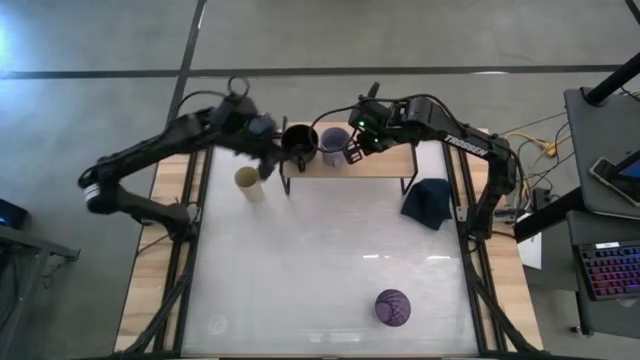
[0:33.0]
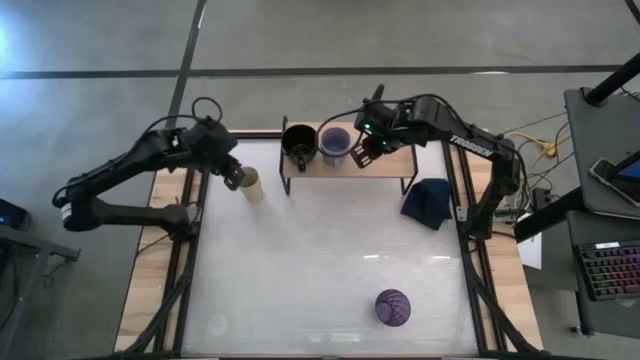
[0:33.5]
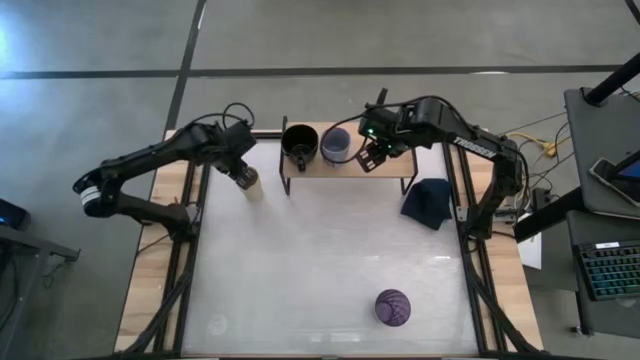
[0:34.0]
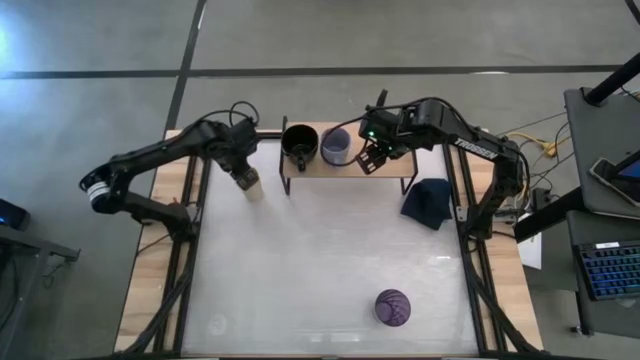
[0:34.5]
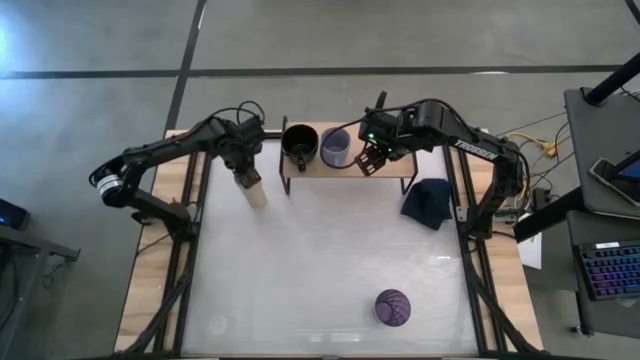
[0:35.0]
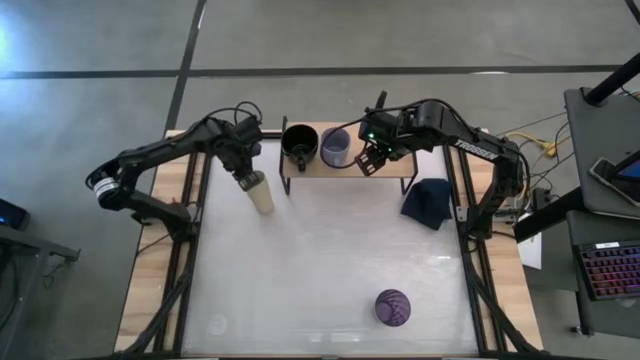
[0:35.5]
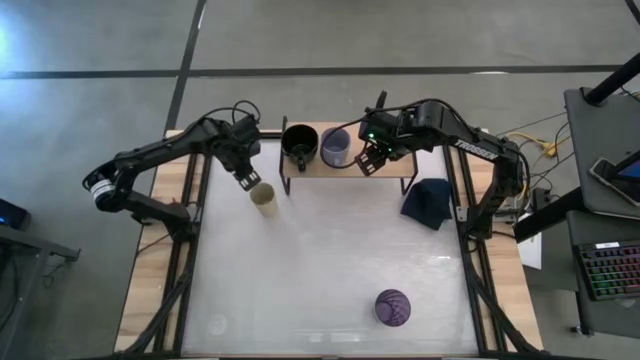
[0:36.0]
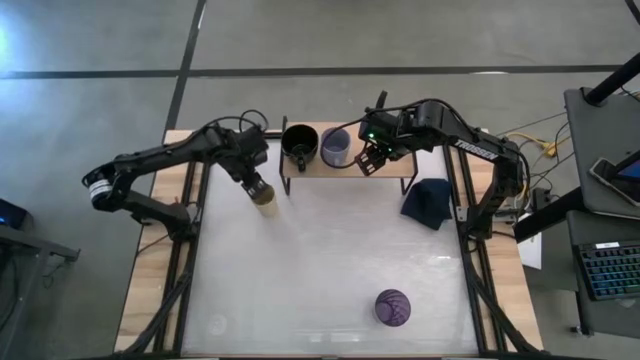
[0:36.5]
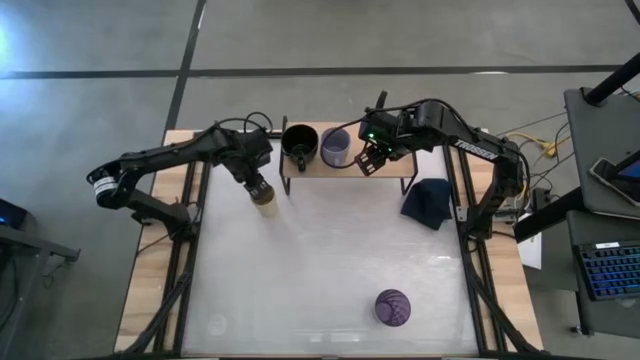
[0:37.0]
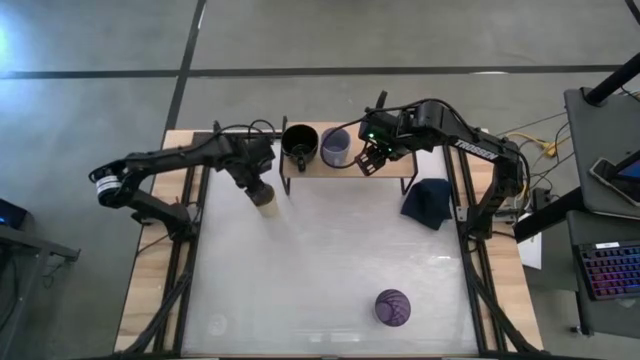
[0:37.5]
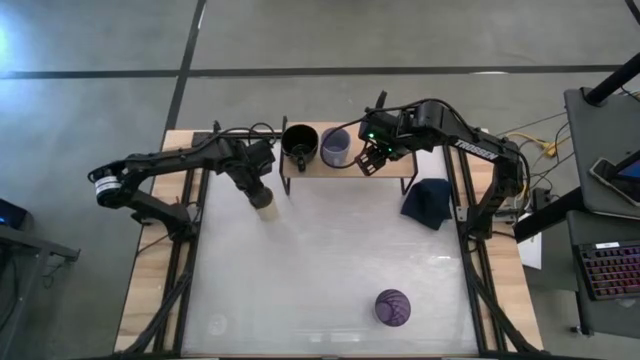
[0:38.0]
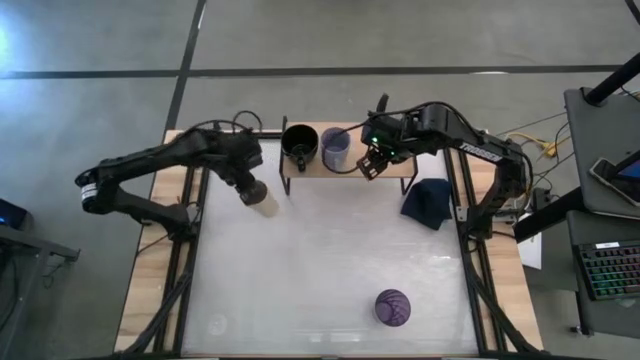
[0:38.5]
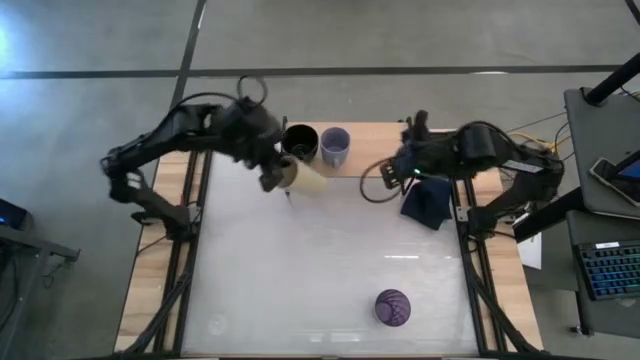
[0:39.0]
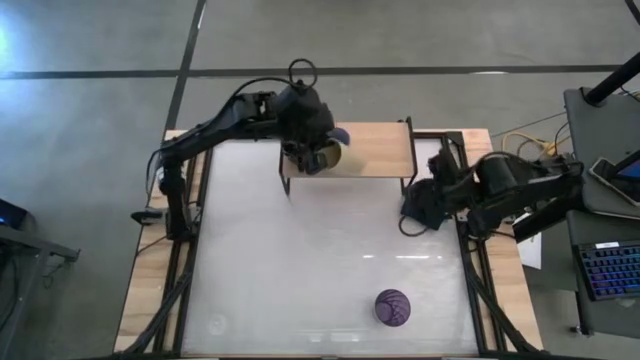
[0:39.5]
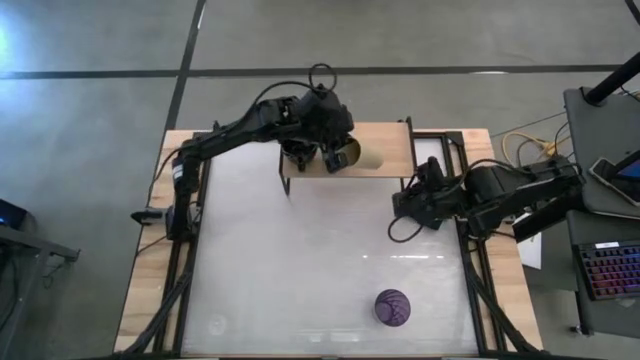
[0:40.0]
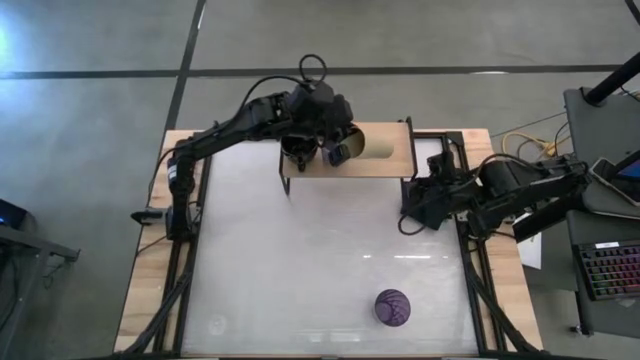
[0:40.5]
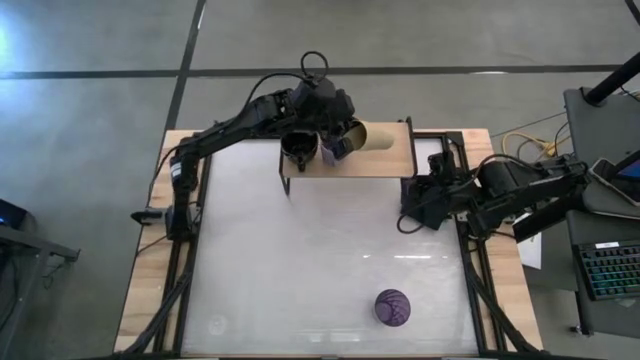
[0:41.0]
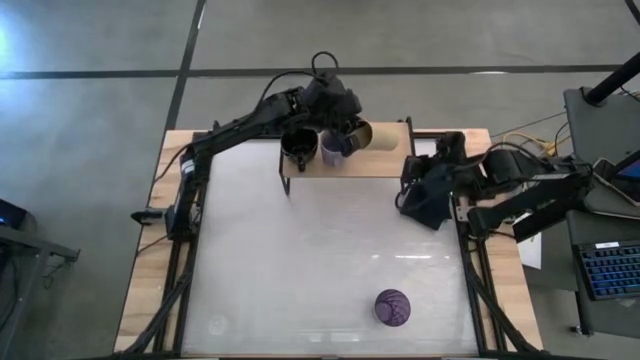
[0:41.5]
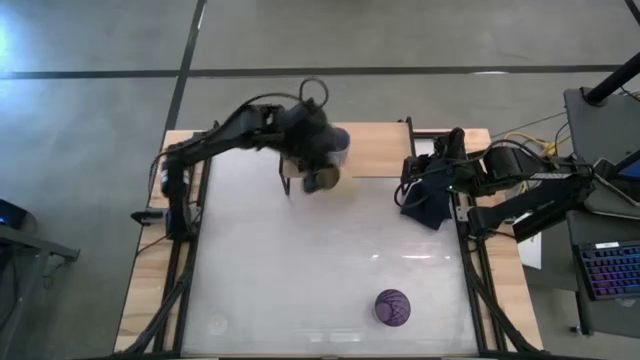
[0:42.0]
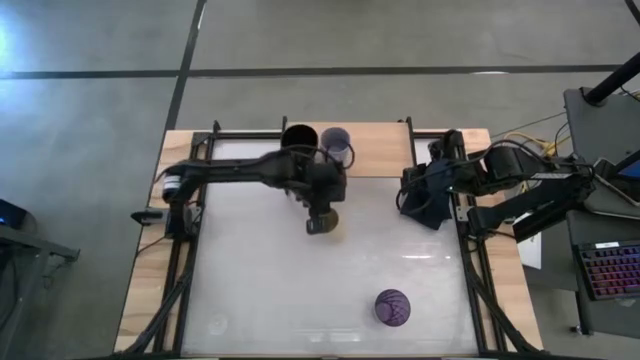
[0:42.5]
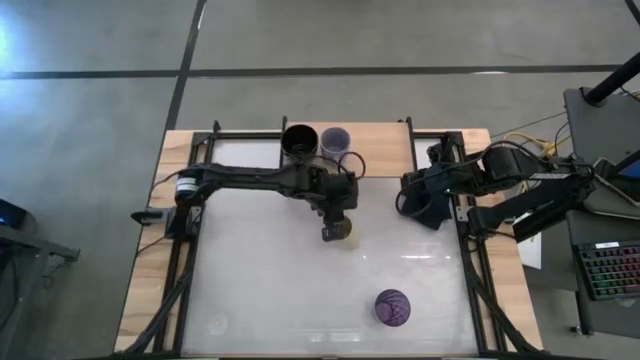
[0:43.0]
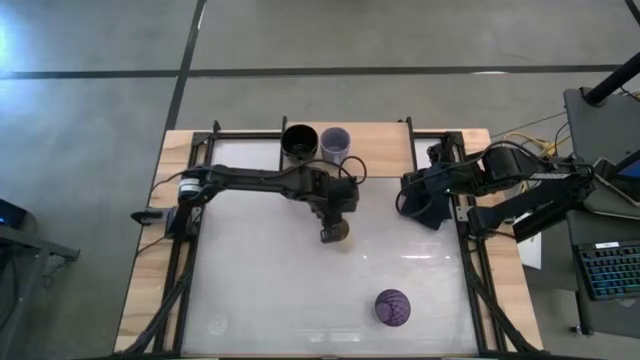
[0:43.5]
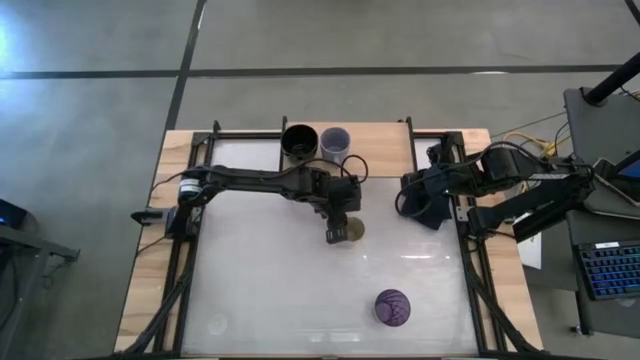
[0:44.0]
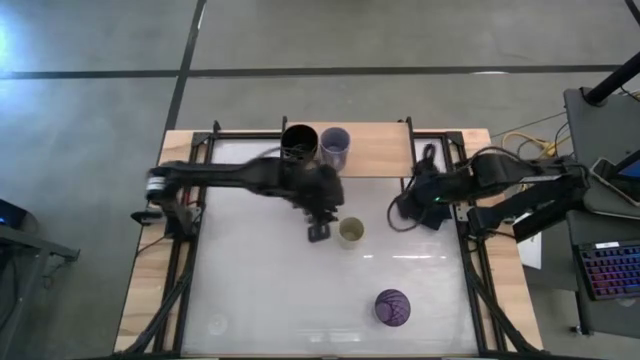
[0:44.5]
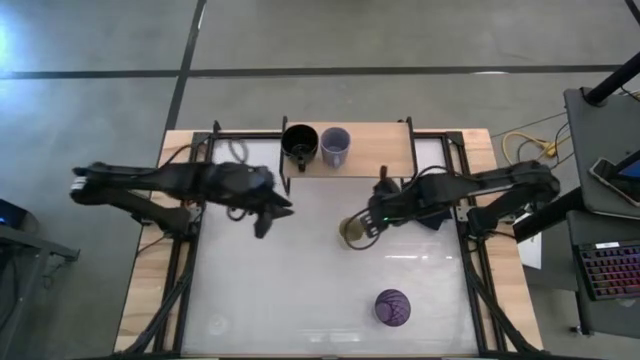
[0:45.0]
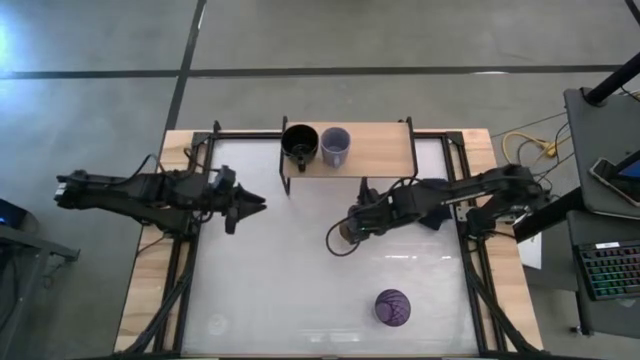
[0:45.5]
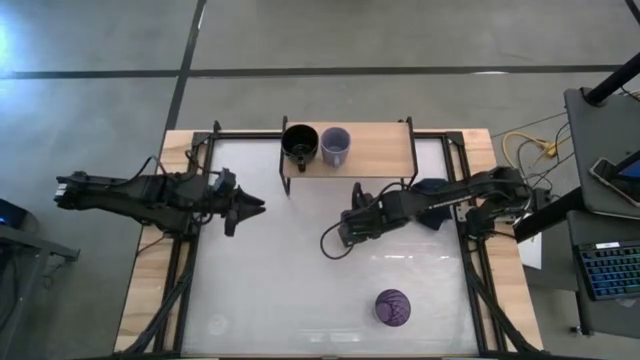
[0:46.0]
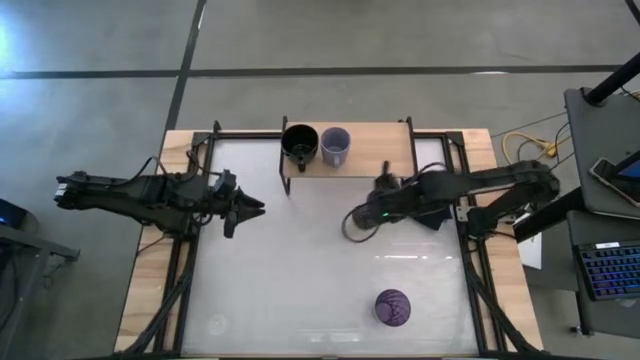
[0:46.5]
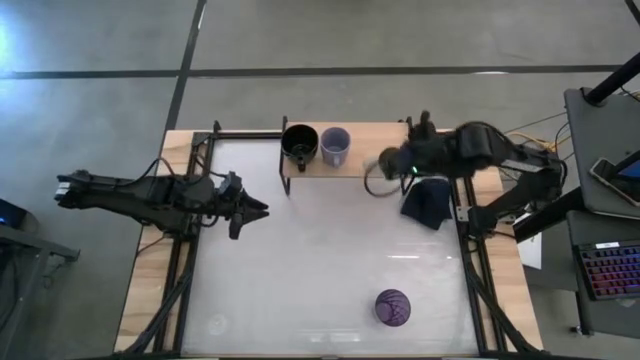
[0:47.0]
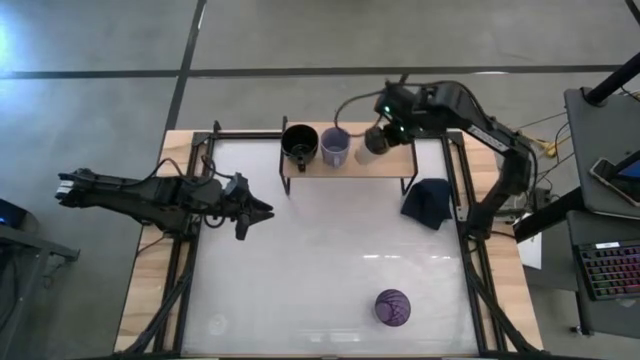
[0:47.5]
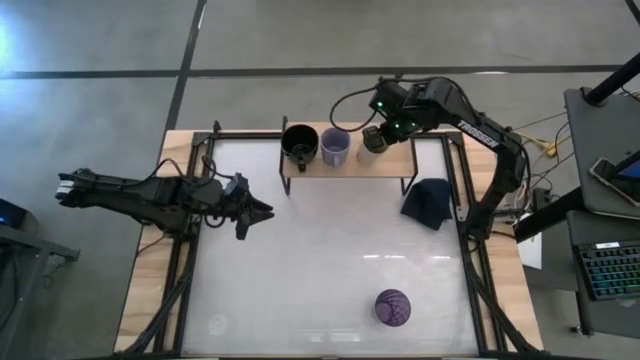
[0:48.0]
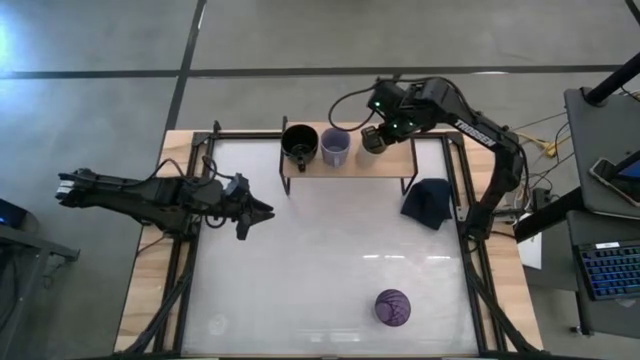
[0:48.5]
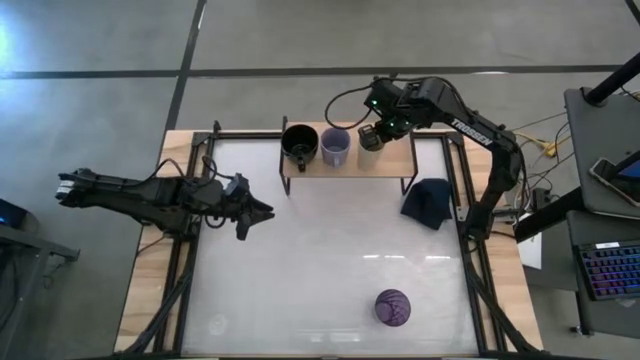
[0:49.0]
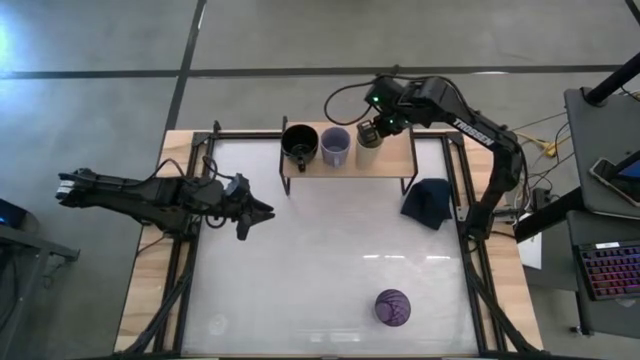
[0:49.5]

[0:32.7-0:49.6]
Task: Stack small to large cups/mugs on shelf
Put the yellow cup on the shelf

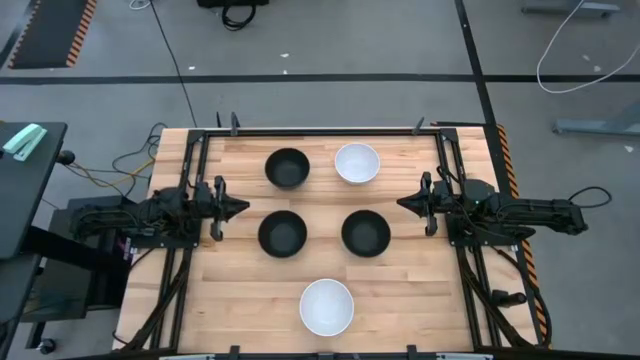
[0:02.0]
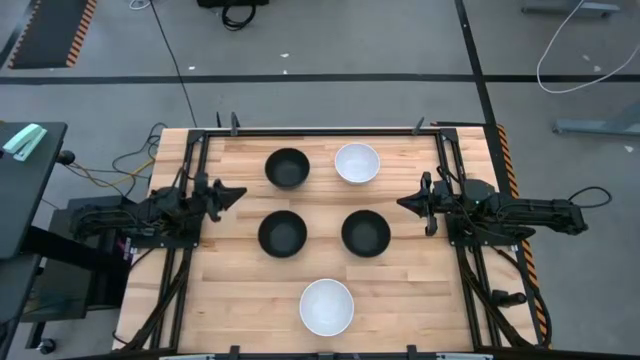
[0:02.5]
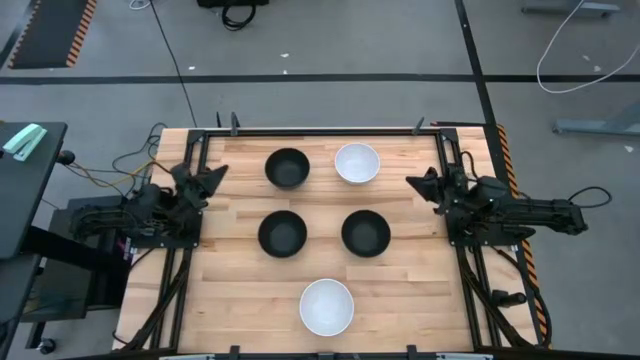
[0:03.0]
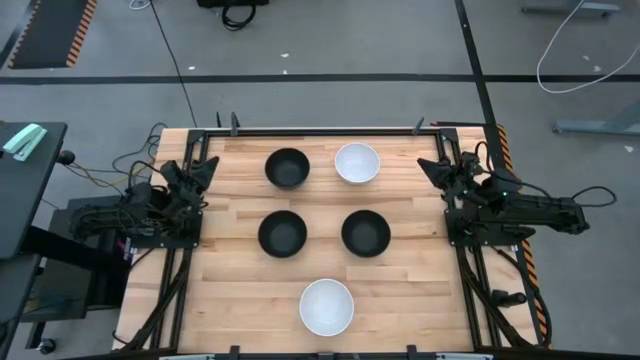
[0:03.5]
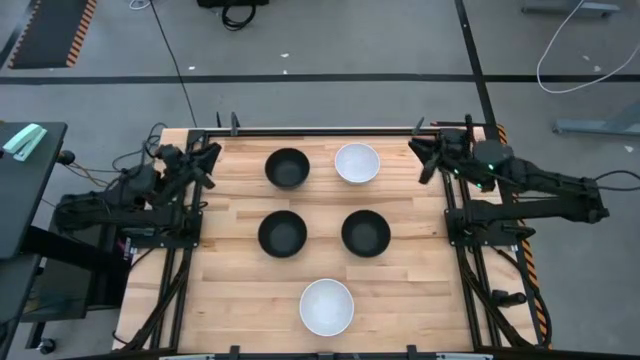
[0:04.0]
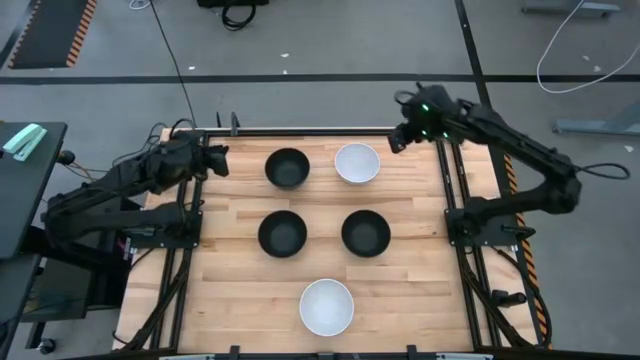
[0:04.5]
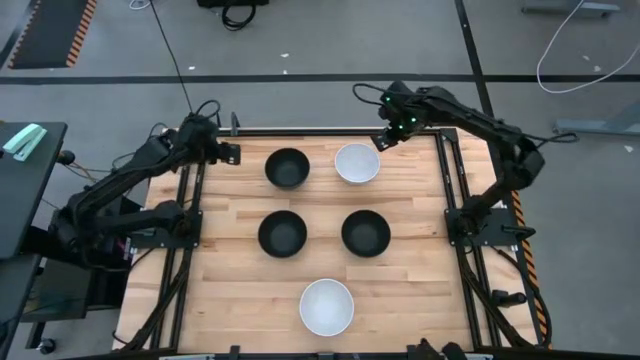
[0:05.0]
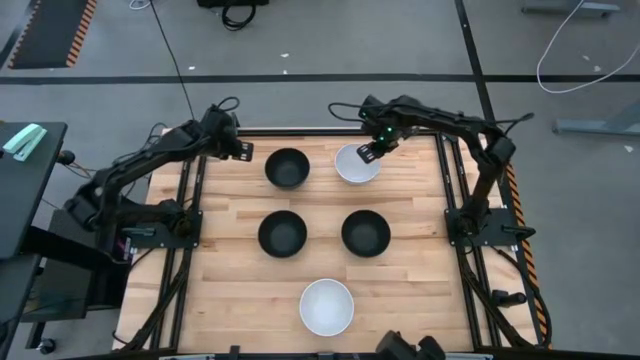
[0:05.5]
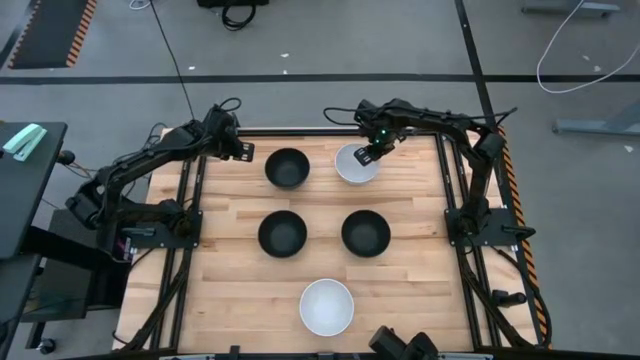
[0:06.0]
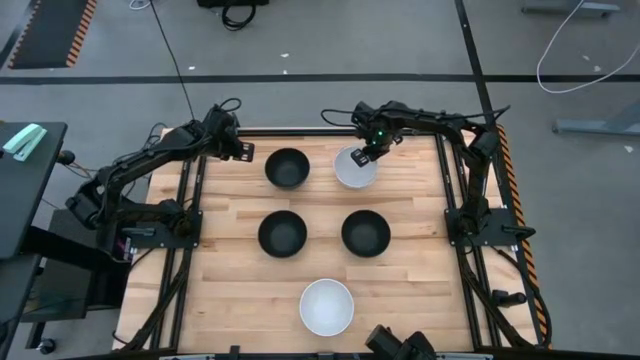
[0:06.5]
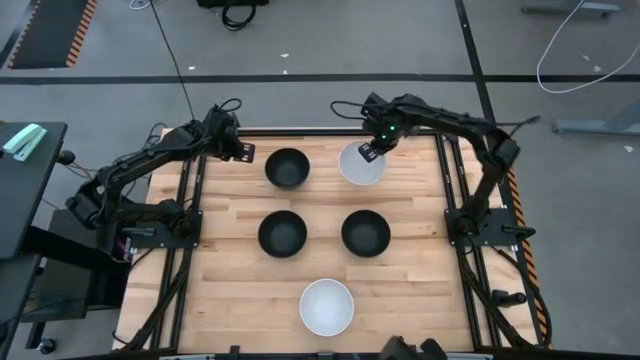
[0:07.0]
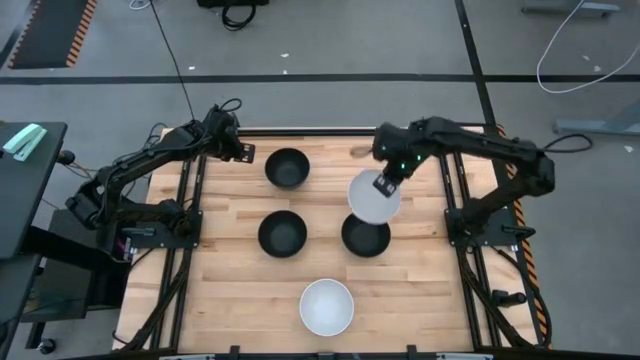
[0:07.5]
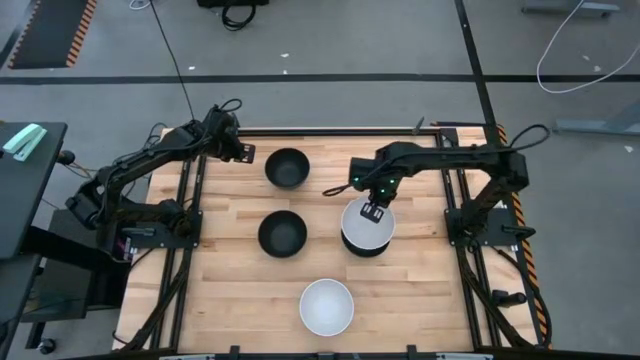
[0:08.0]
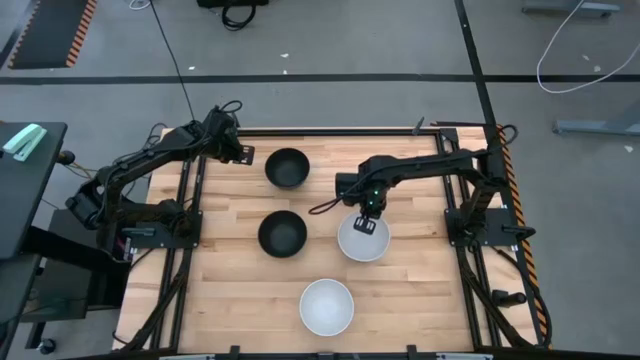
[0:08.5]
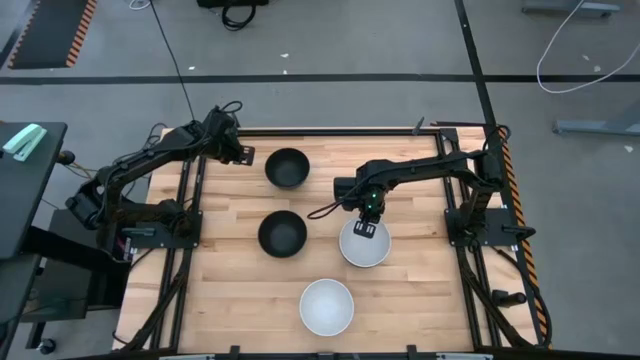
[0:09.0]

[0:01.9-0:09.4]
Task: Nest bowls inside each other
Stack the top white bowl on top of the bottom right black bowl
